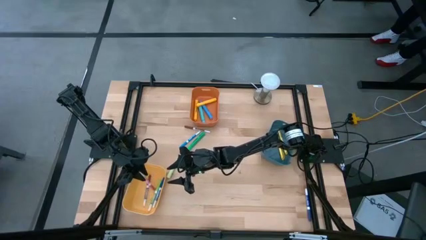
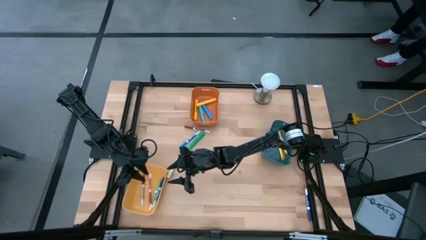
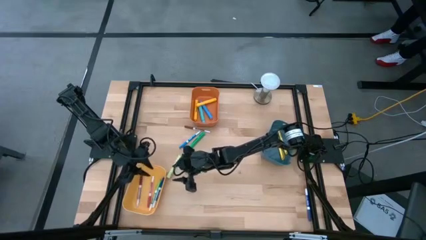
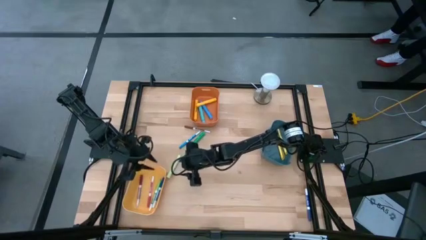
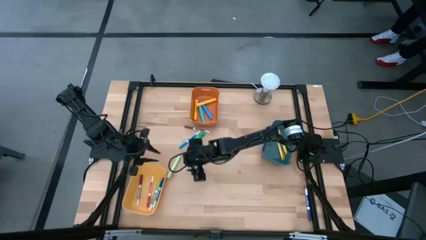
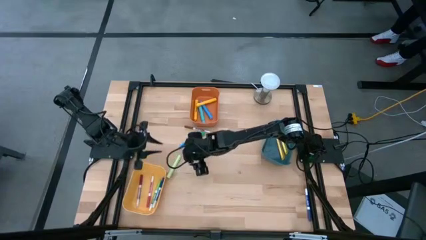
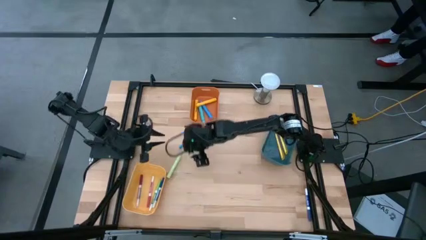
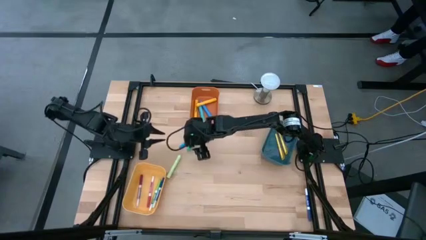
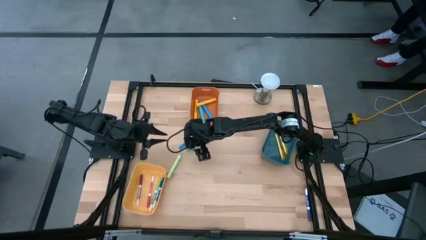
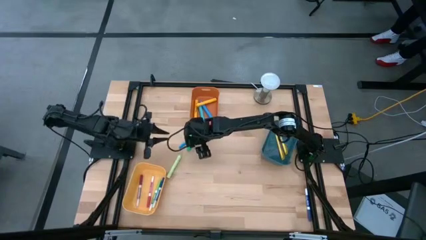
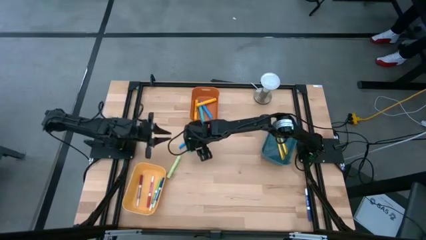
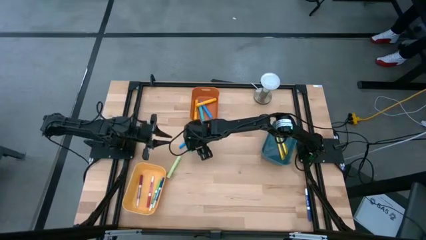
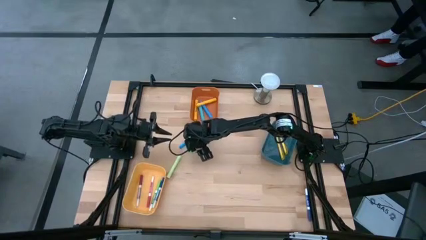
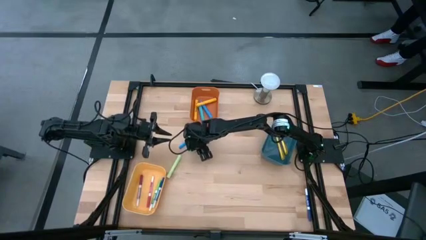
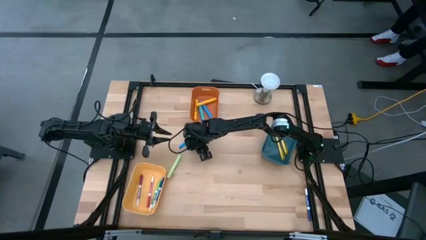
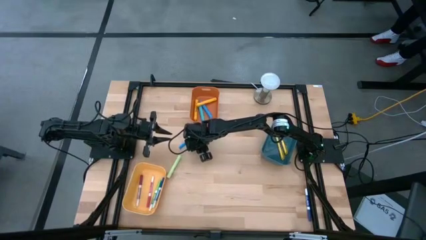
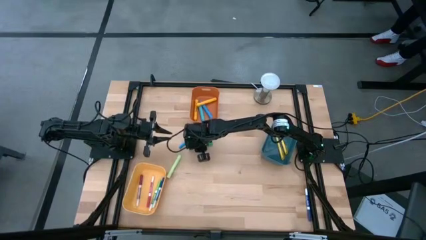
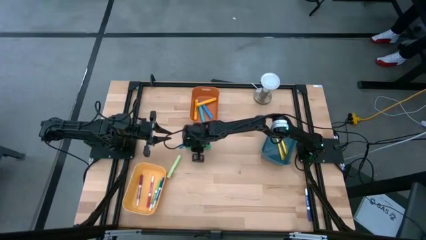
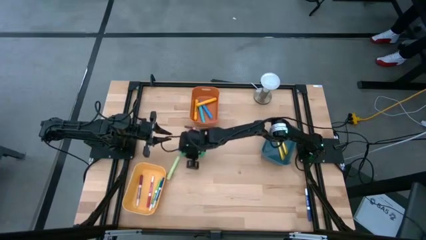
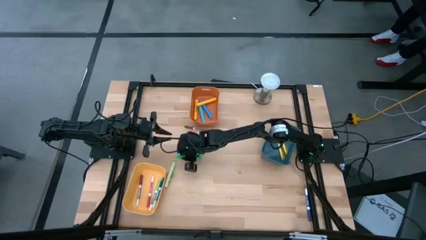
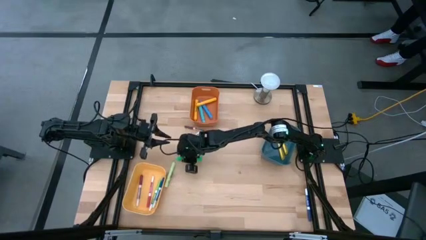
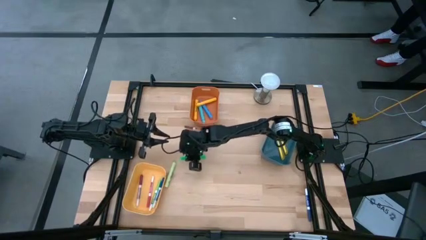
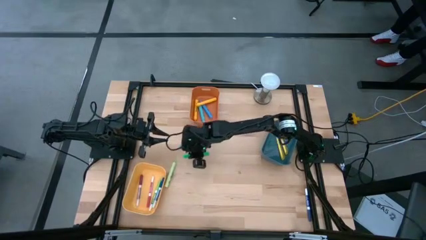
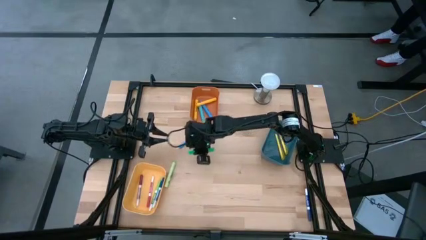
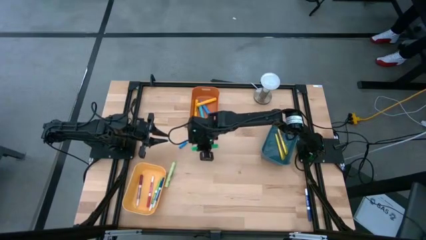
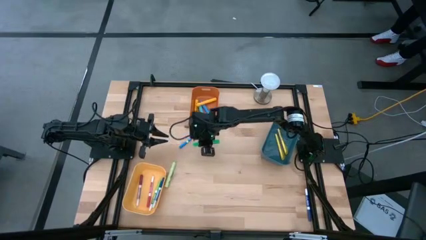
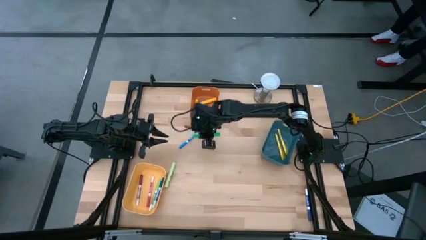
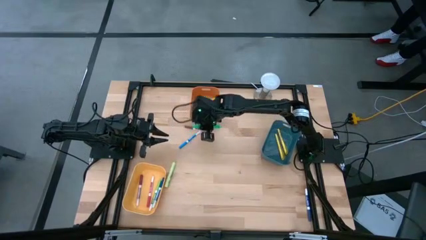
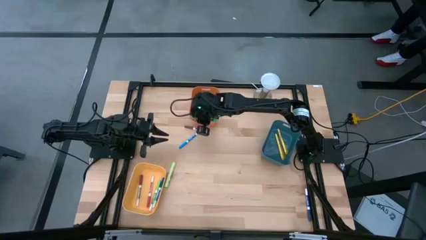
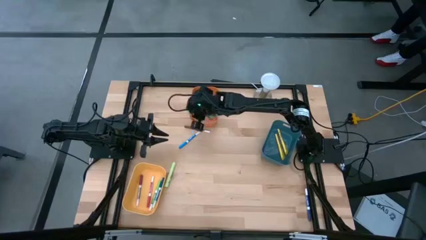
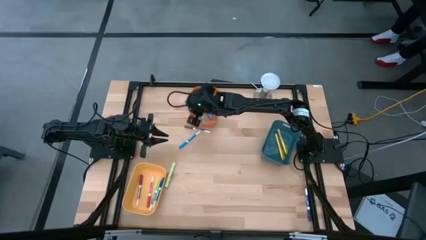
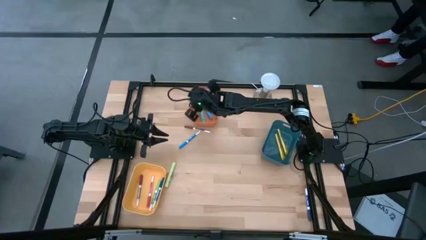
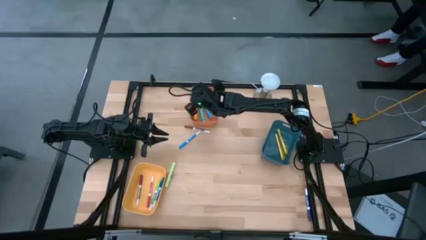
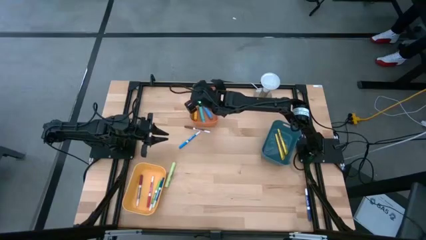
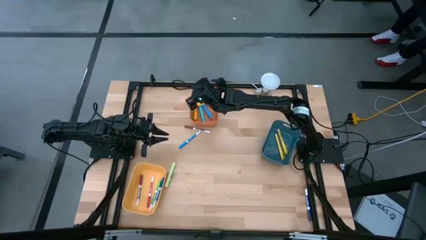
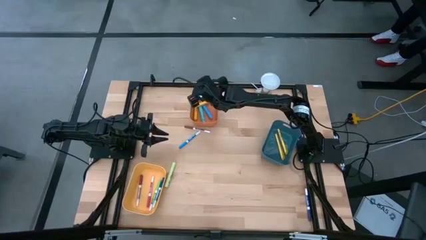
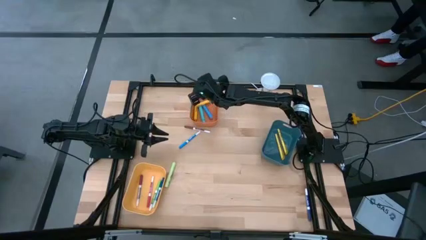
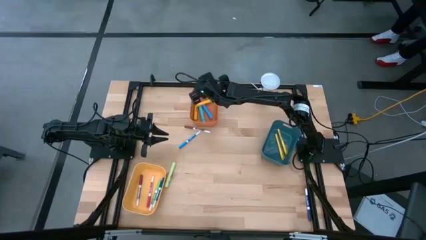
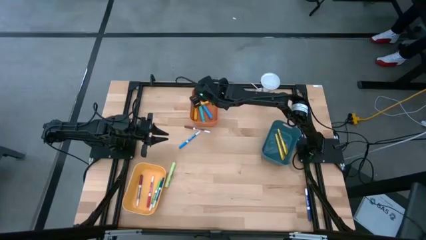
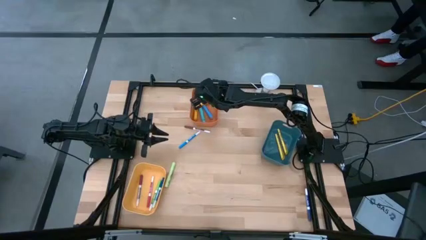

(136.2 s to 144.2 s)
Task: Pick & Place Markers
Put the green highlighter pen into the orange bin

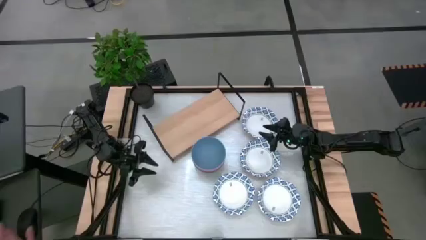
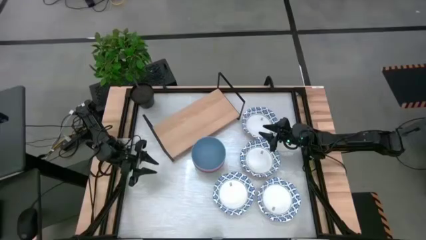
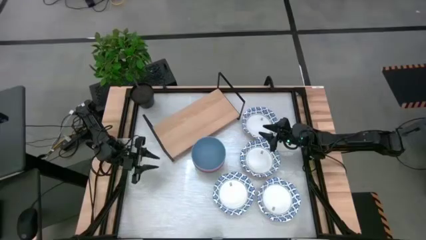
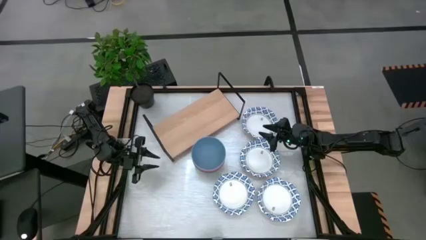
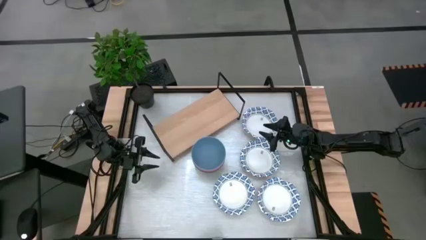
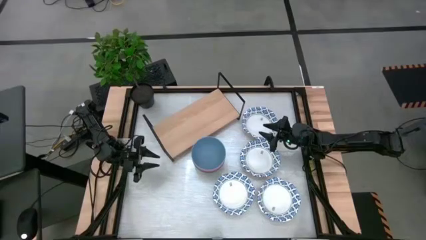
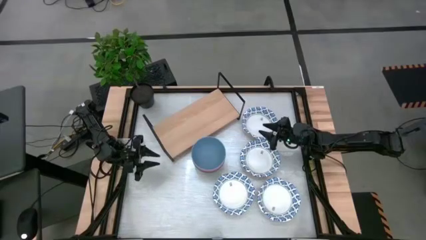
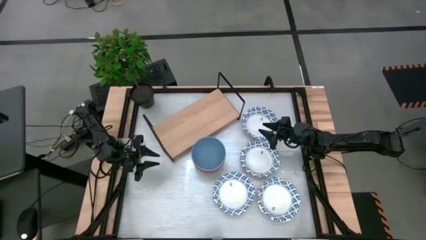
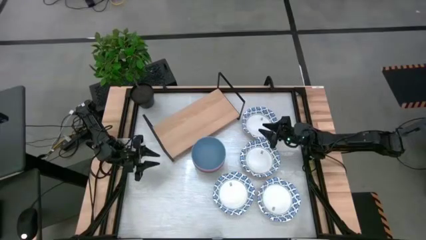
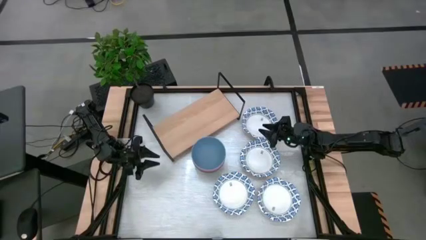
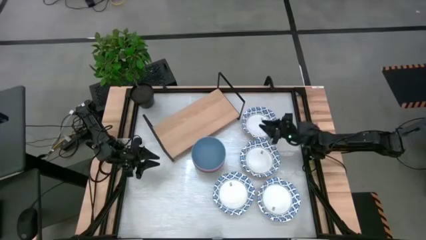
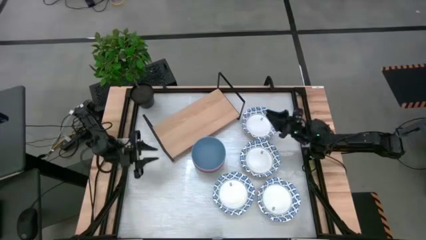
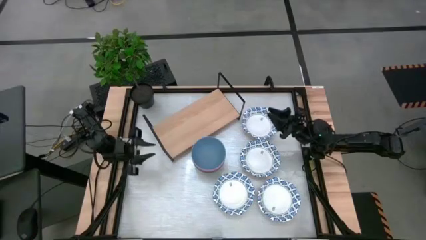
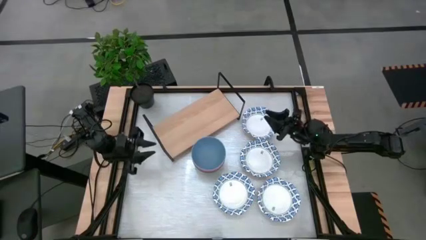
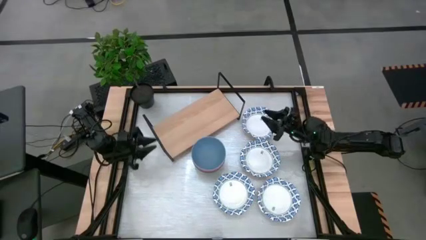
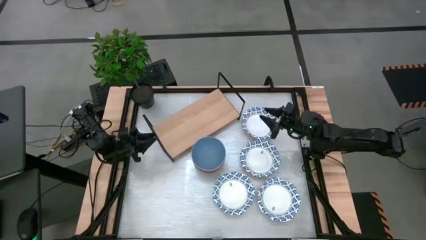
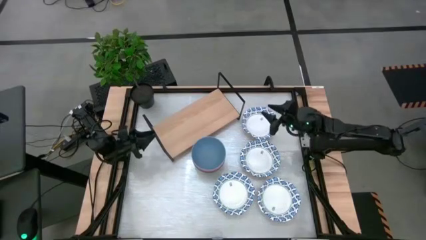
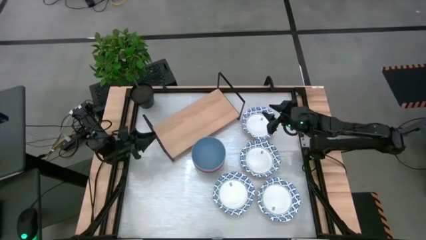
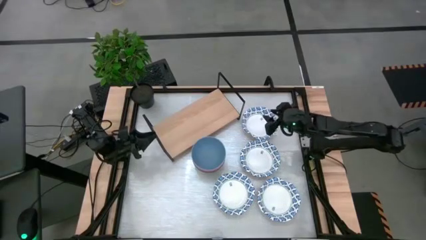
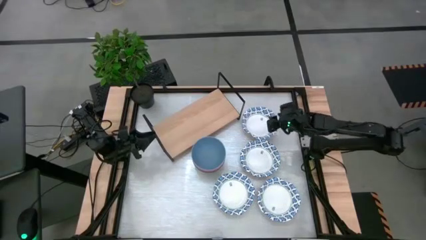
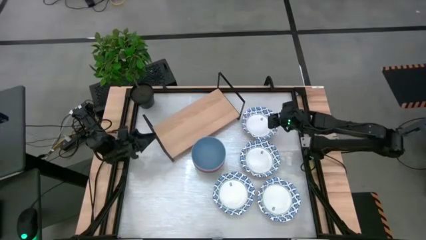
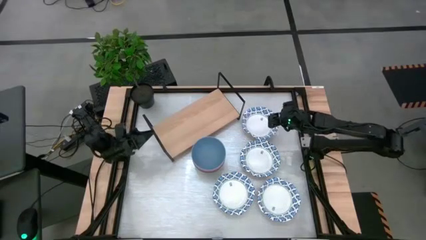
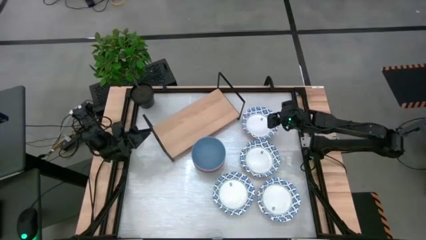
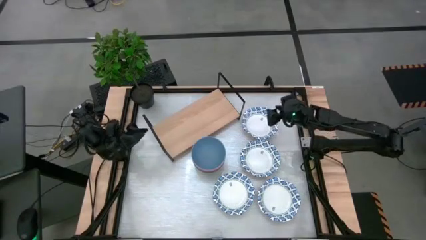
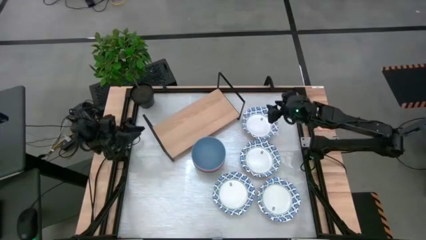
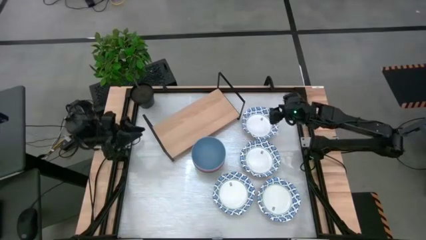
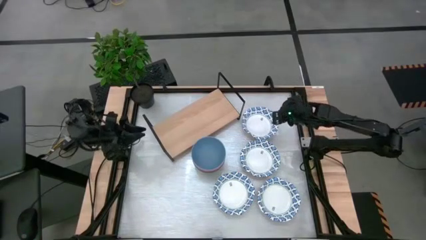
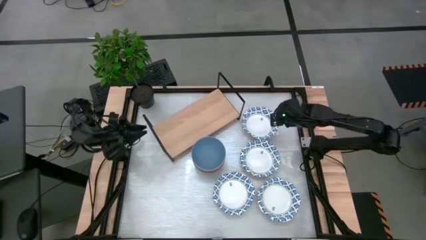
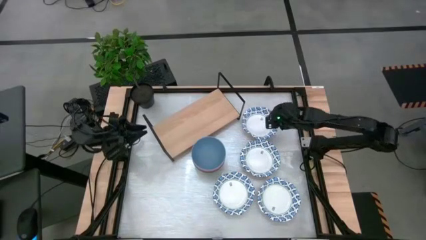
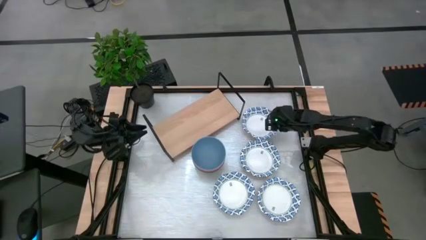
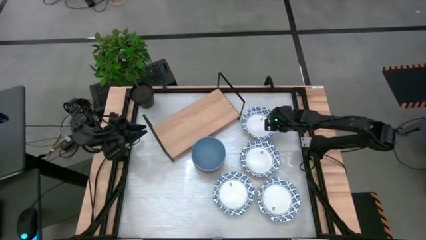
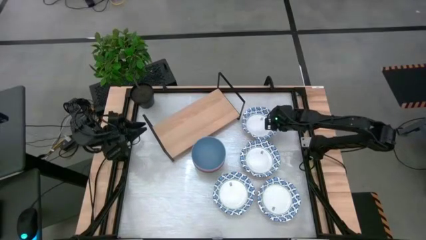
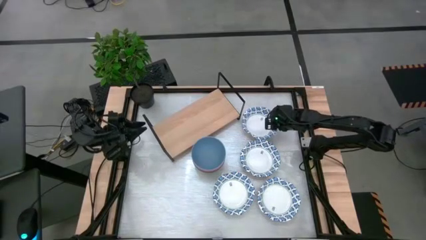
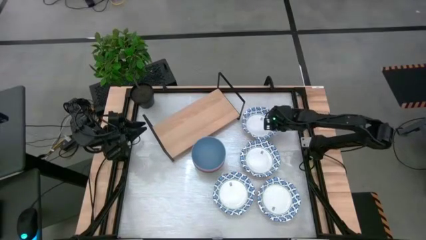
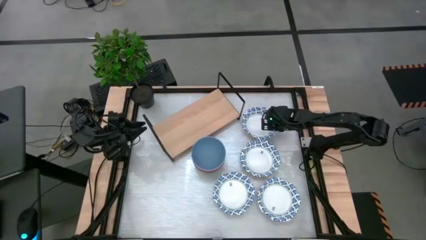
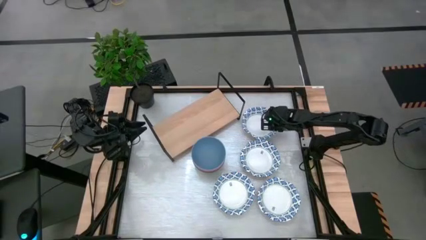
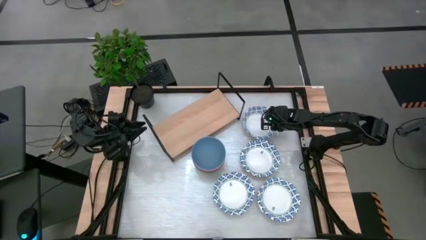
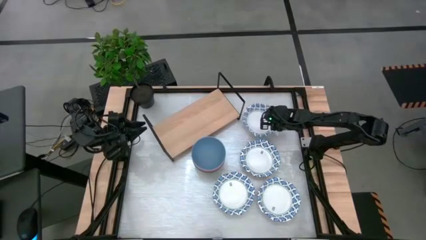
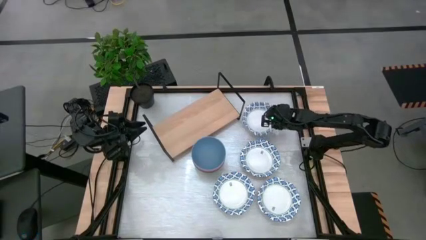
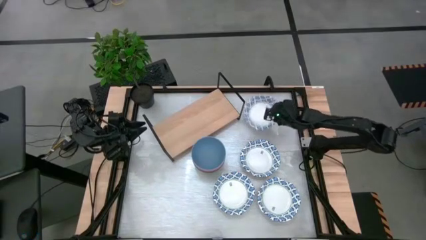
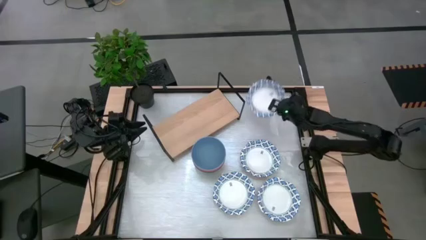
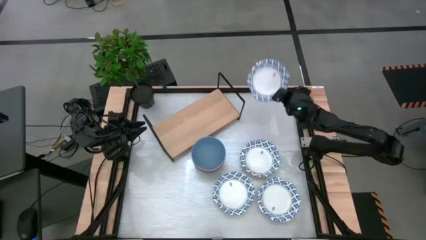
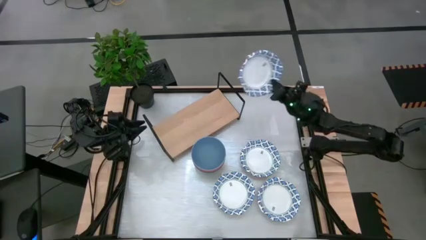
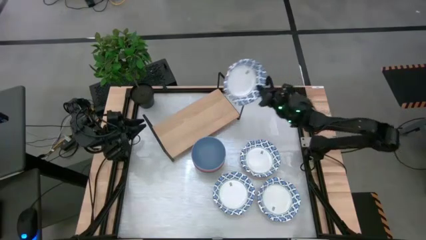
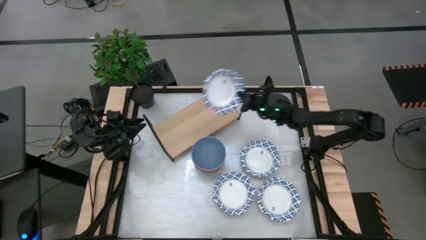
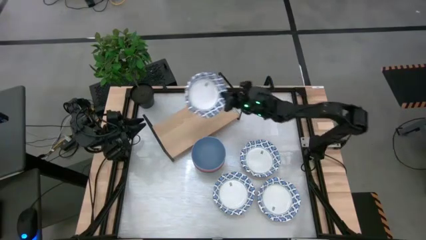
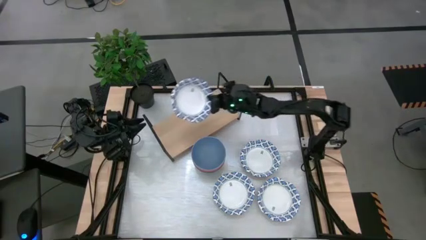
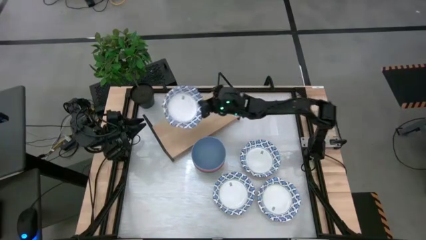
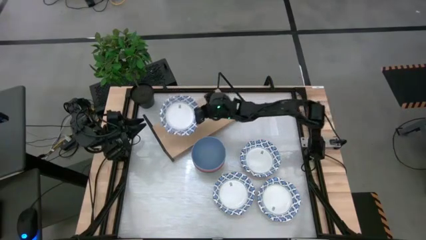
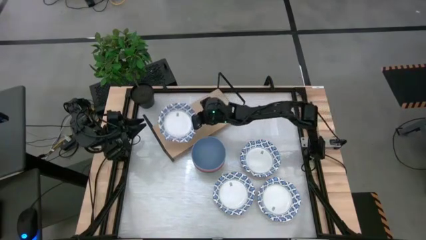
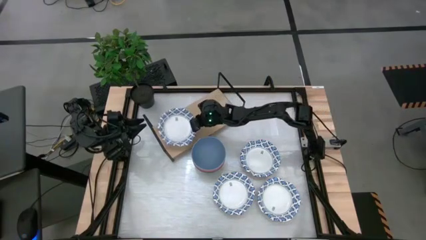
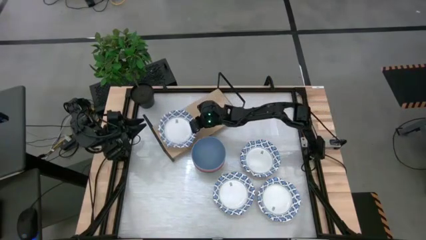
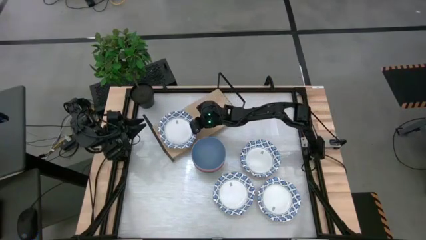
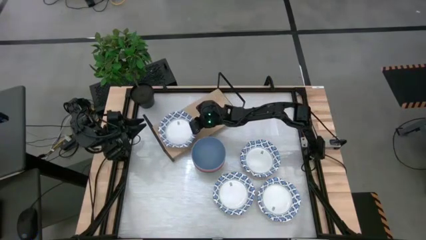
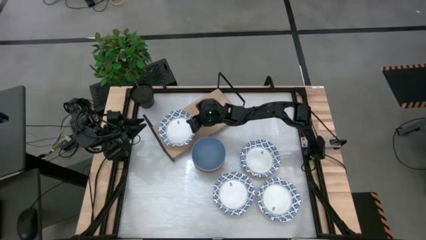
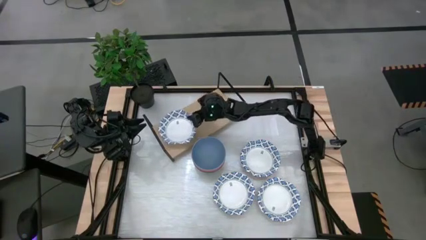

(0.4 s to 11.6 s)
Task: Place and stack bowls onto a shelf
Put the white blue patterned bowl on the shelf
